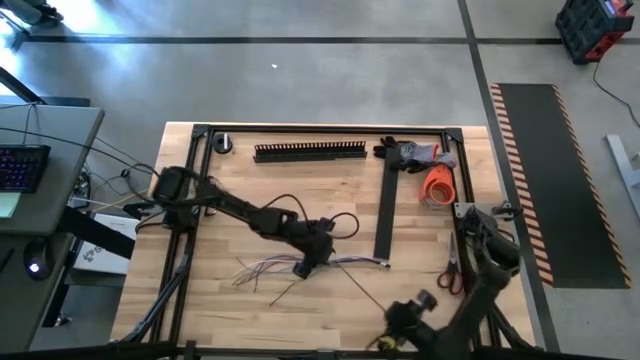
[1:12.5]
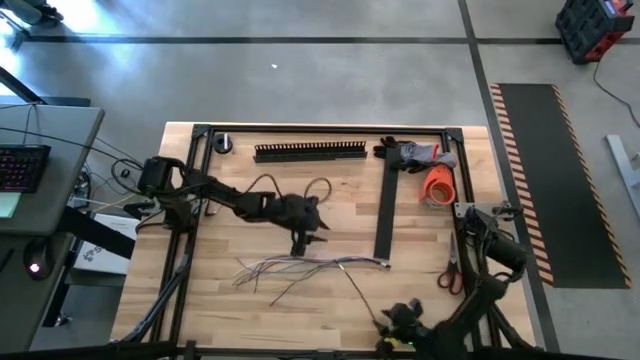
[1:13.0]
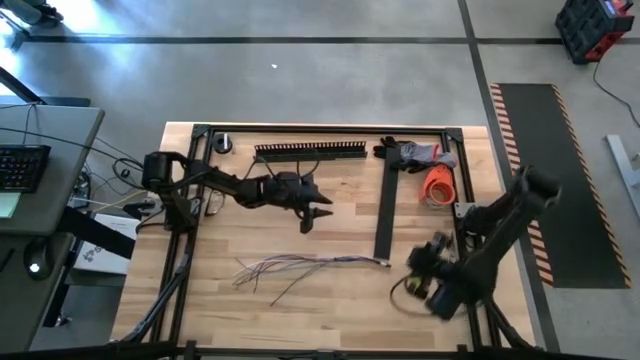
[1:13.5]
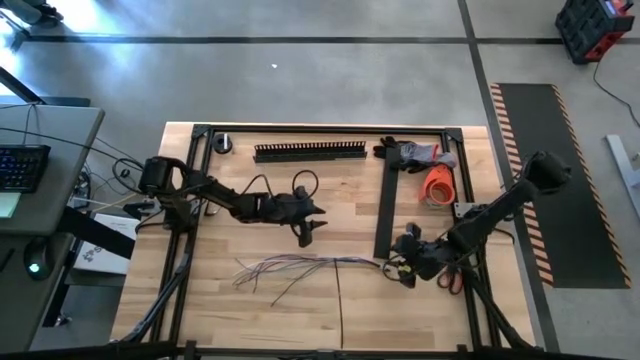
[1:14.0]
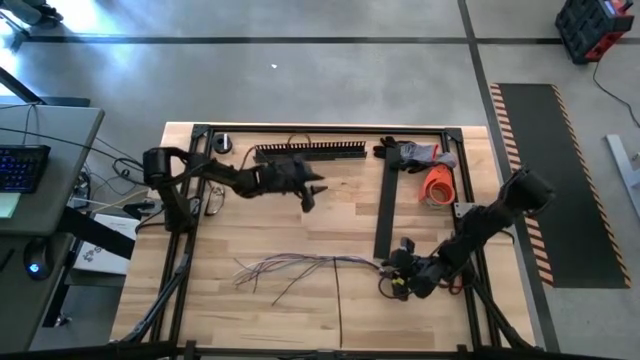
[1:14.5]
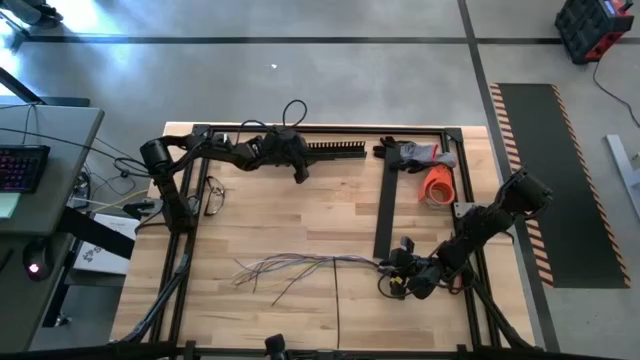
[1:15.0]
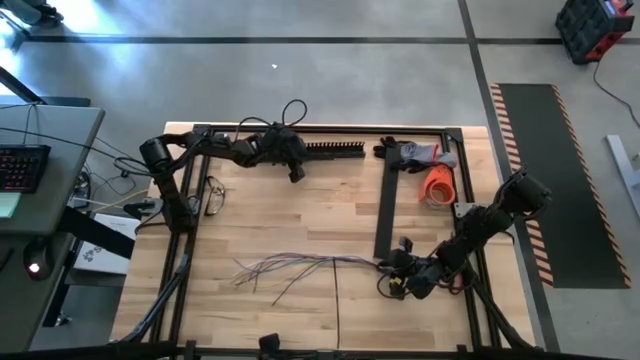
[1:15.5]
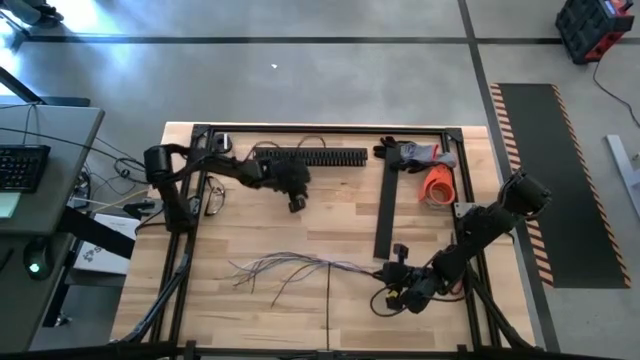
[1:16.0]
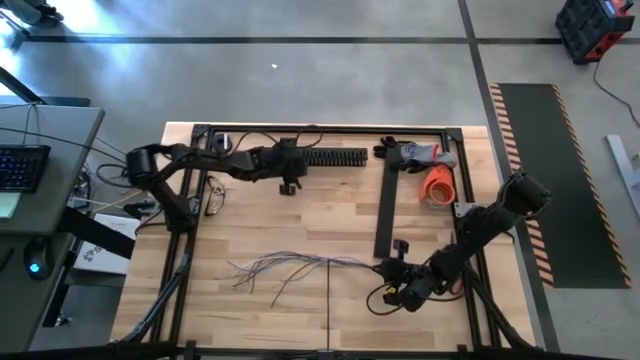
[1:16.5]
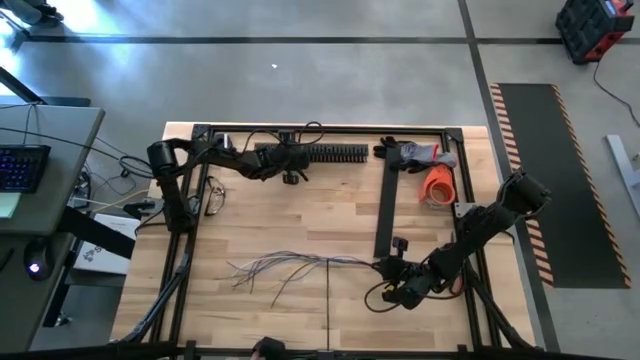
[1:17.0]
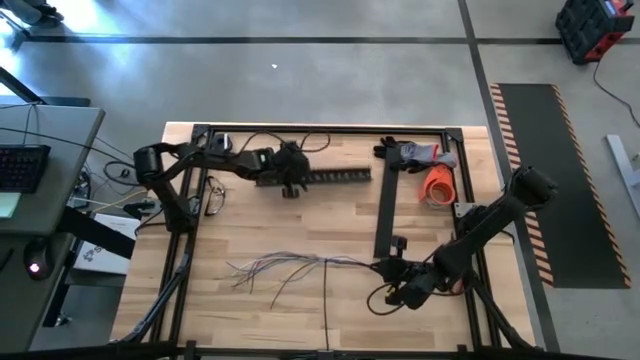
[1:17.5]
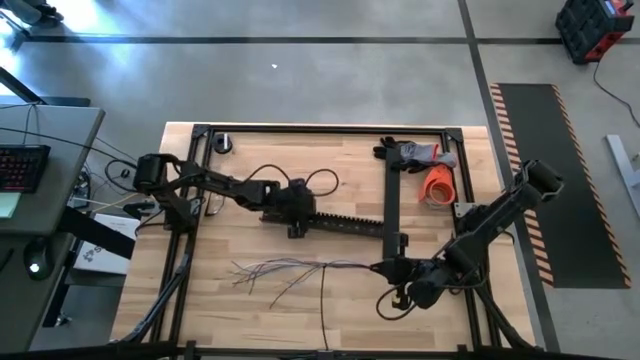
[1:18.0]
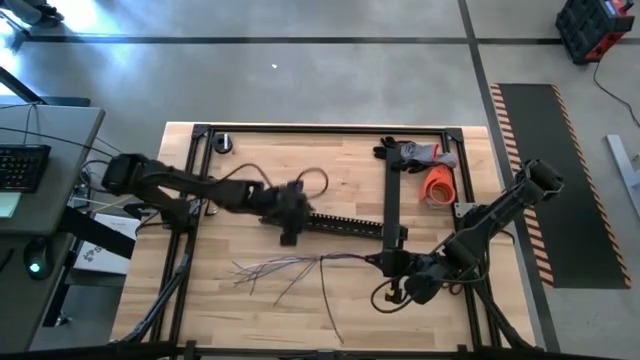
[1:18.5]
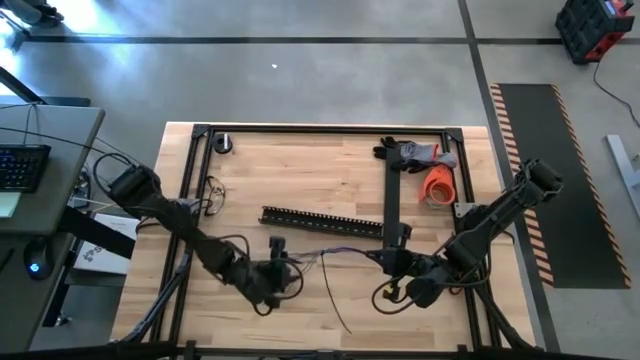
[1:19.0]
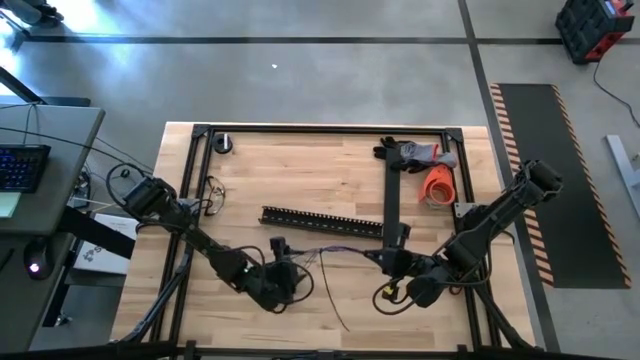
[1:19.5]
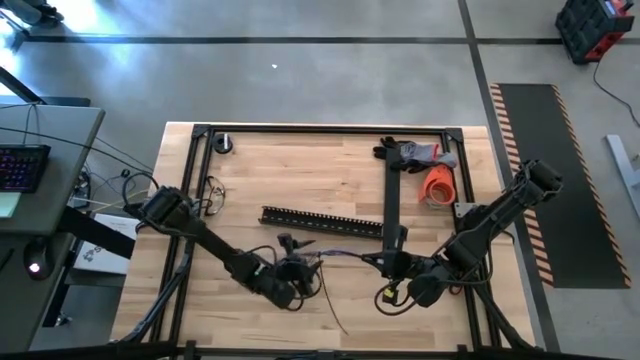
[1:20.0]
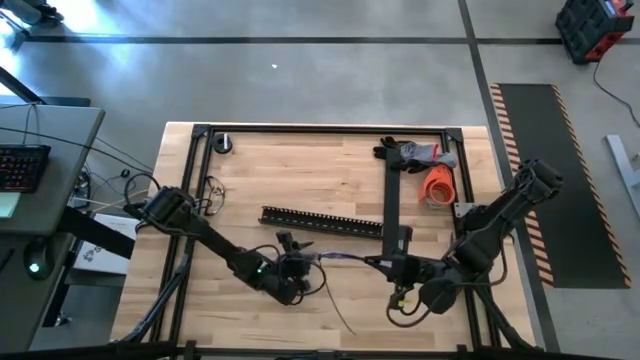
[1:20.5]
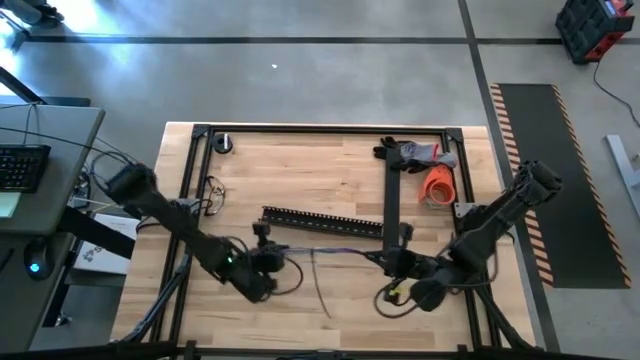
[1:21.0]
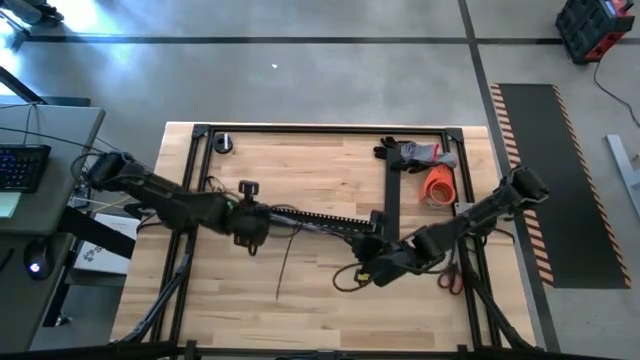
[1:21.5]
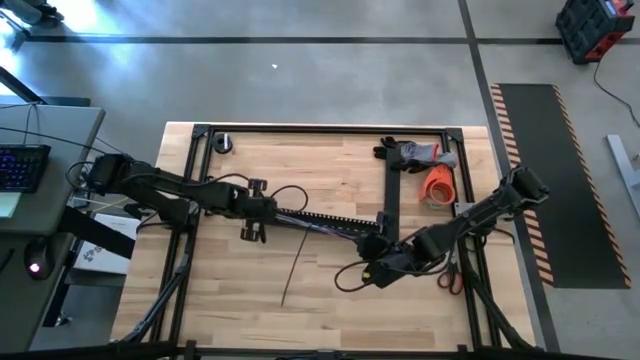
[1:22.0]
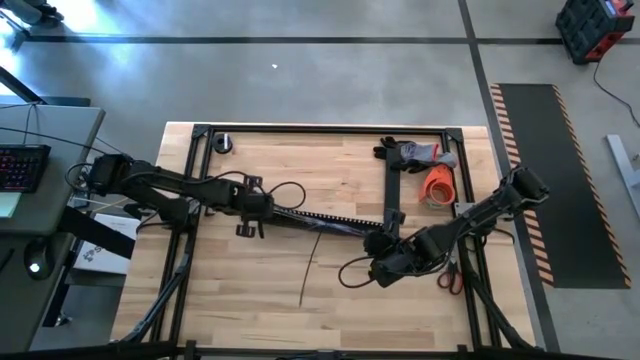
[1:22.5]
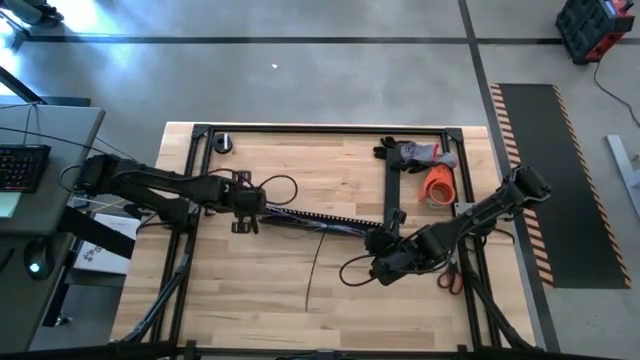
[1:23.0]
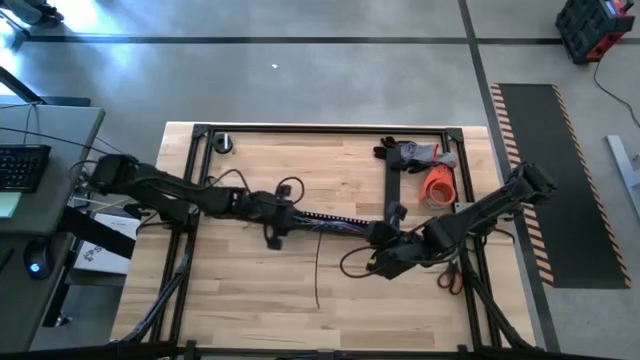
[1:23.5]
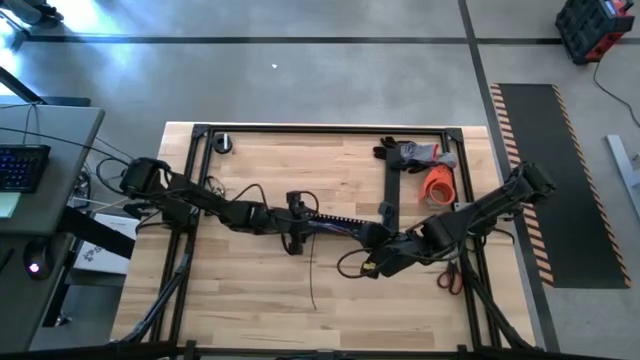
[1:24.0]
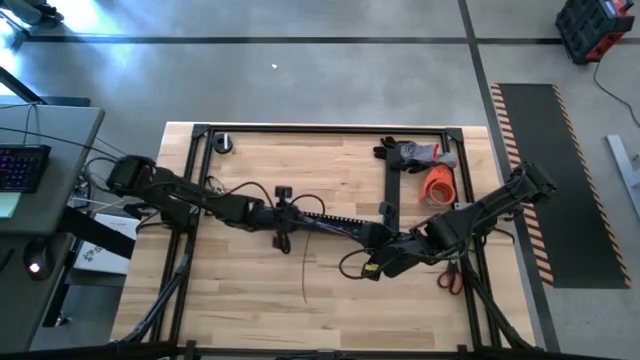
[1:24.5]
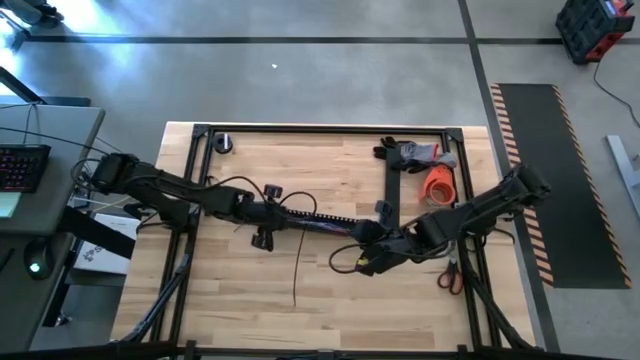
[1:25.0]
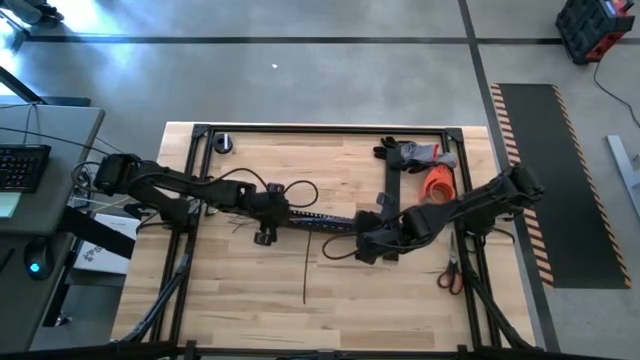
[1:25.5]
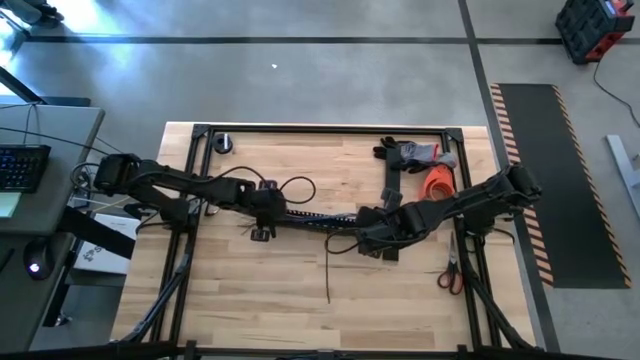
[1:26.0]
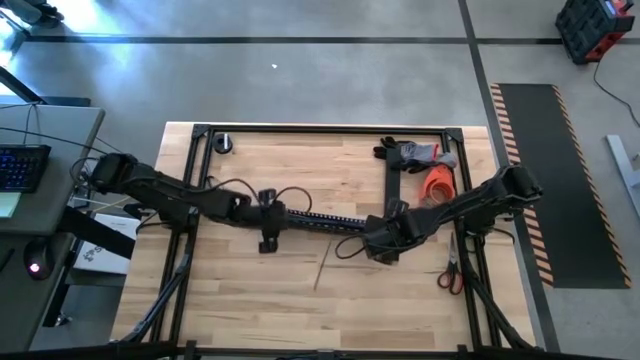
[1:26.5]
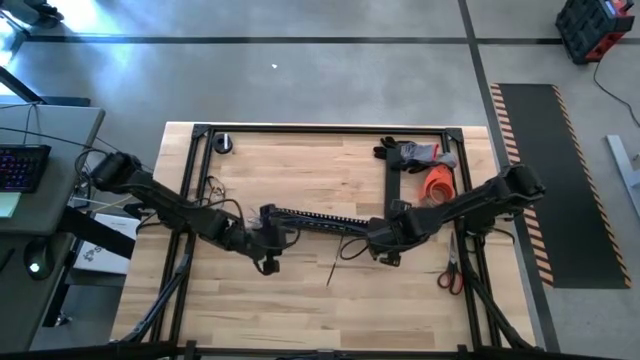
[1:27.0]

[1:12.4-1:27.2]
Task: Ziptie cables
Put the cable wires into the black cable duct
